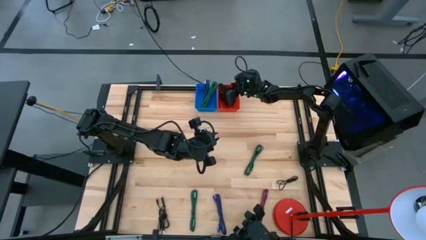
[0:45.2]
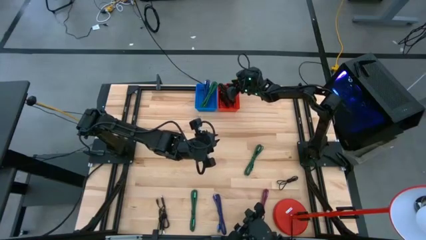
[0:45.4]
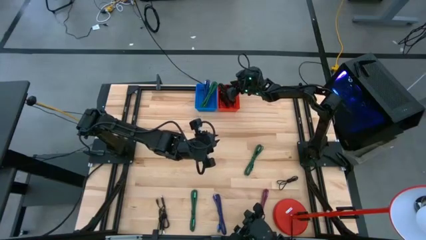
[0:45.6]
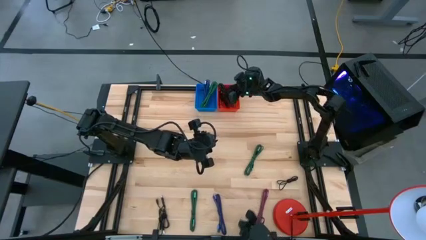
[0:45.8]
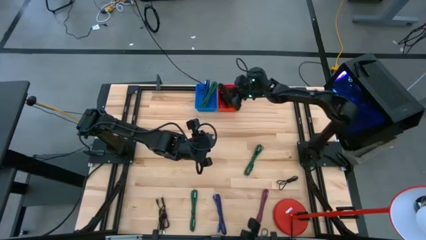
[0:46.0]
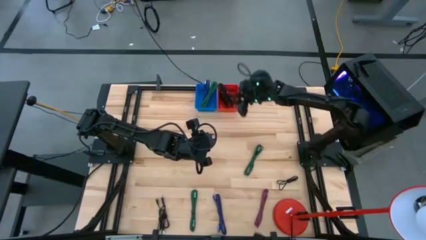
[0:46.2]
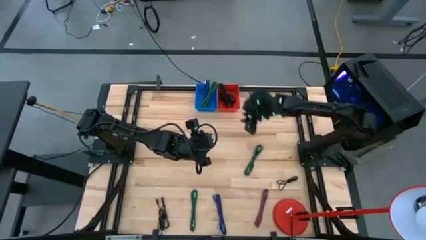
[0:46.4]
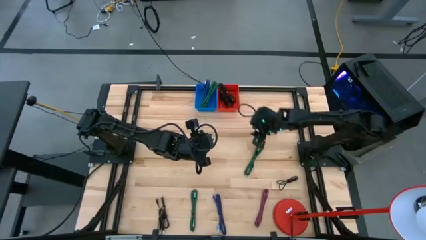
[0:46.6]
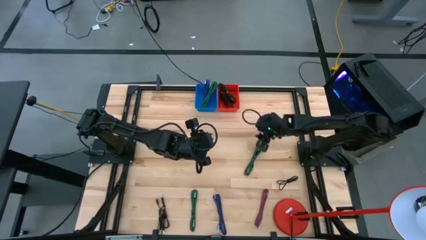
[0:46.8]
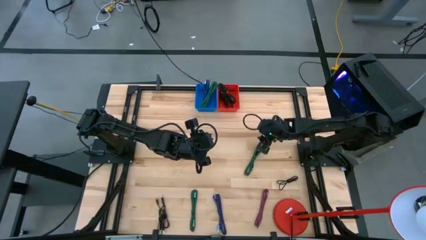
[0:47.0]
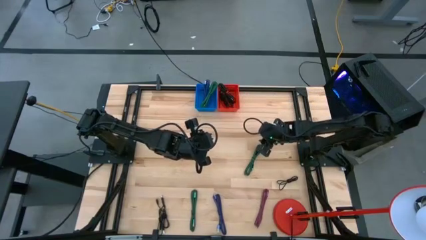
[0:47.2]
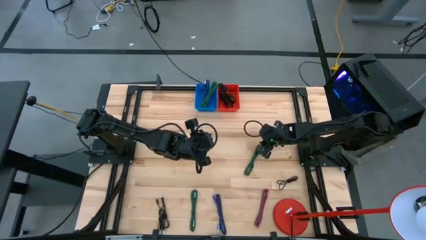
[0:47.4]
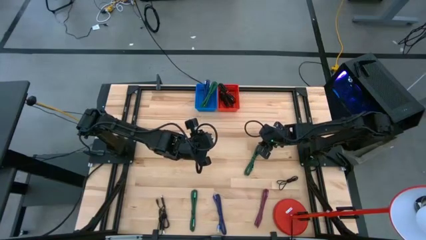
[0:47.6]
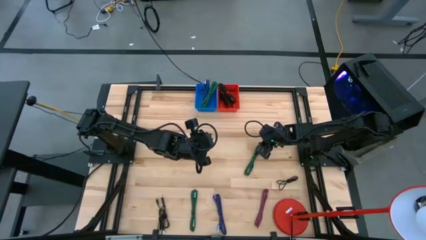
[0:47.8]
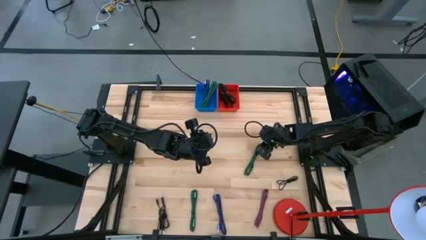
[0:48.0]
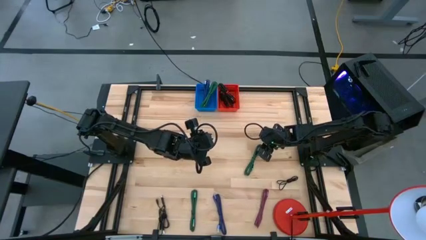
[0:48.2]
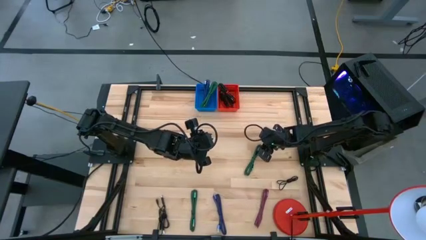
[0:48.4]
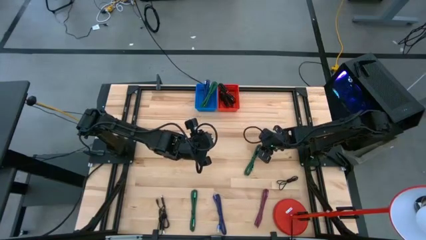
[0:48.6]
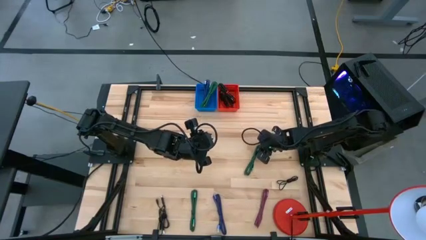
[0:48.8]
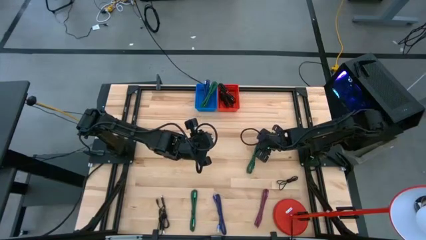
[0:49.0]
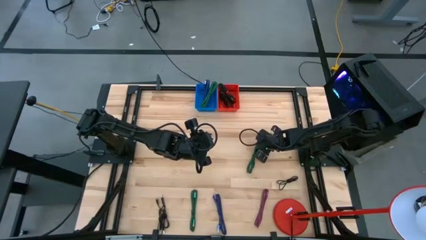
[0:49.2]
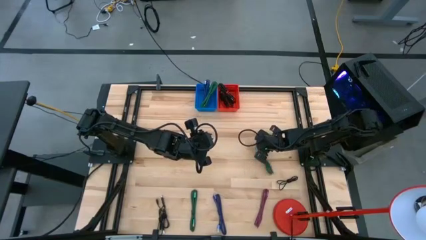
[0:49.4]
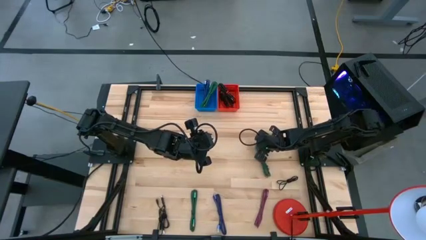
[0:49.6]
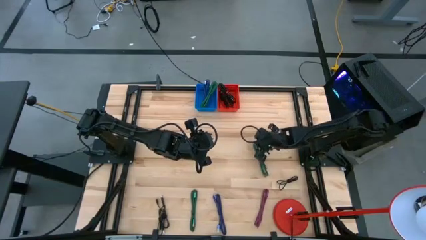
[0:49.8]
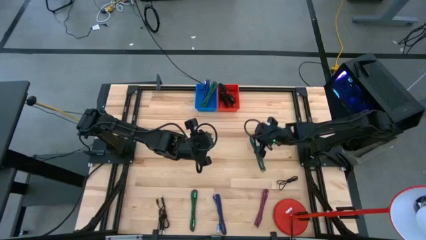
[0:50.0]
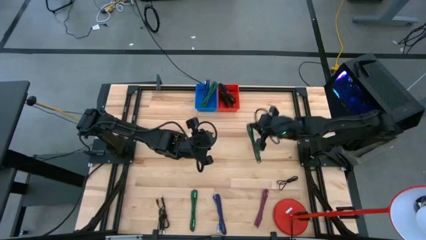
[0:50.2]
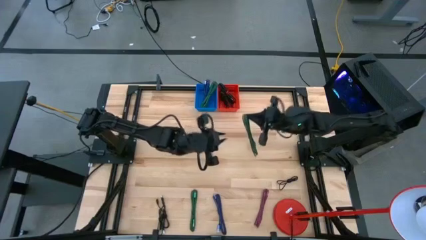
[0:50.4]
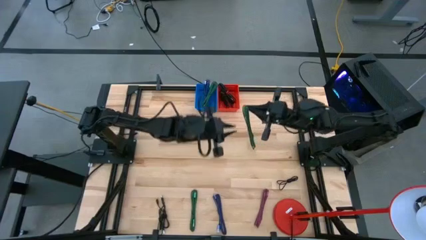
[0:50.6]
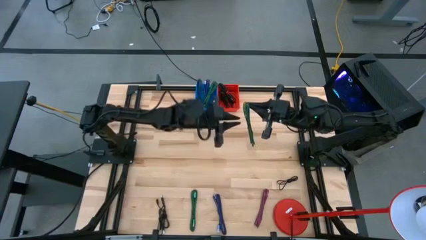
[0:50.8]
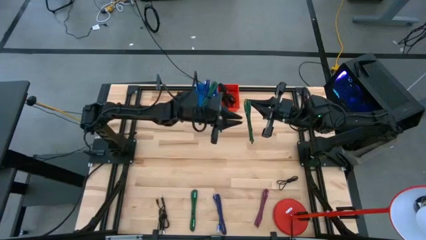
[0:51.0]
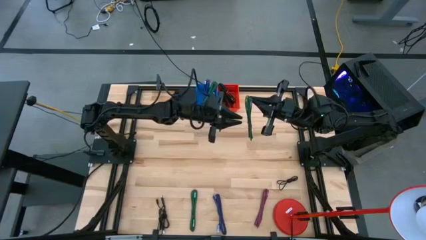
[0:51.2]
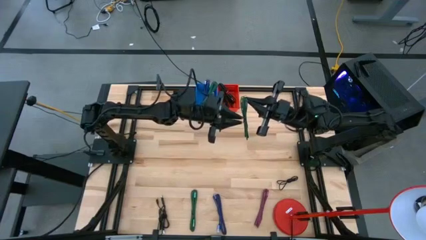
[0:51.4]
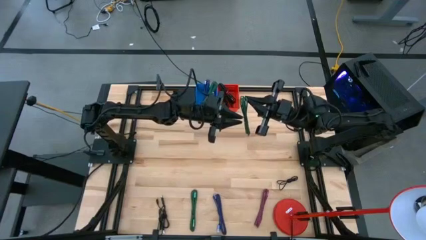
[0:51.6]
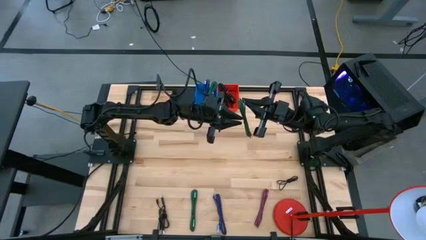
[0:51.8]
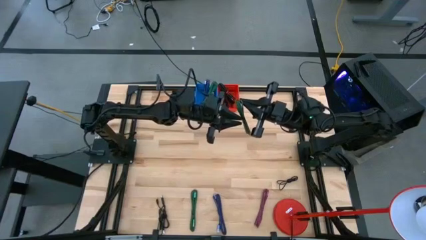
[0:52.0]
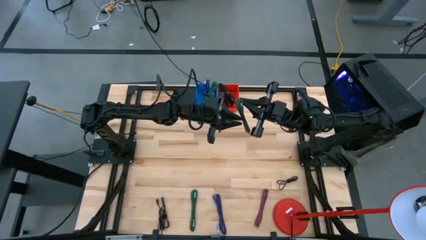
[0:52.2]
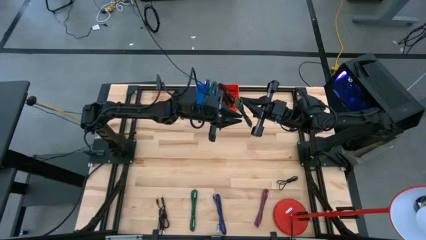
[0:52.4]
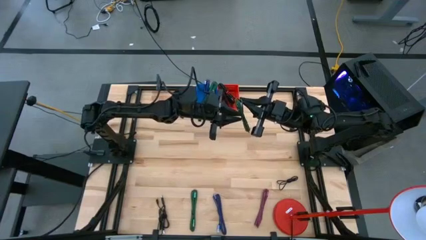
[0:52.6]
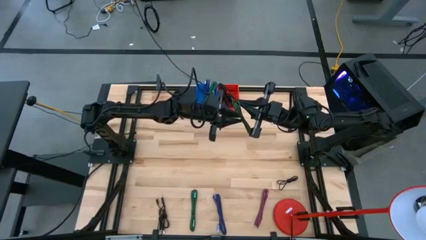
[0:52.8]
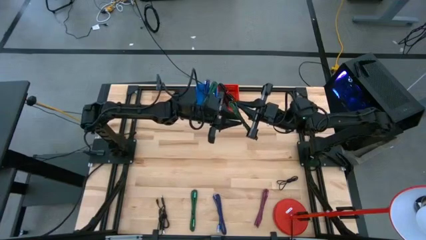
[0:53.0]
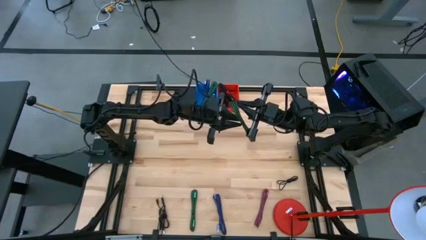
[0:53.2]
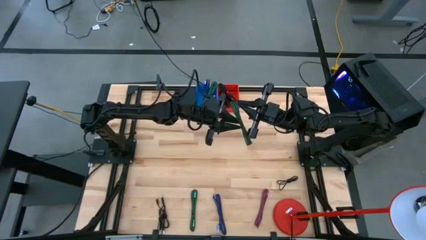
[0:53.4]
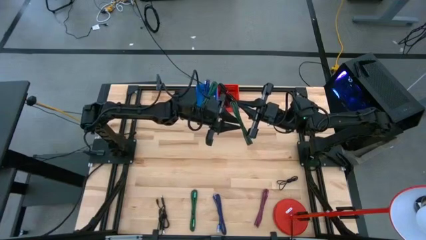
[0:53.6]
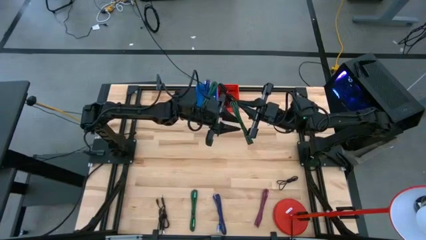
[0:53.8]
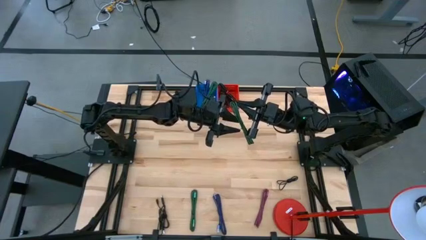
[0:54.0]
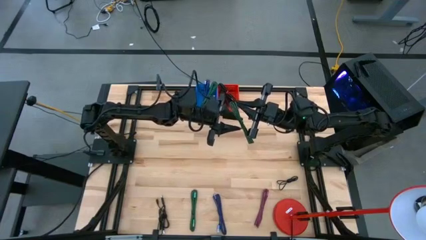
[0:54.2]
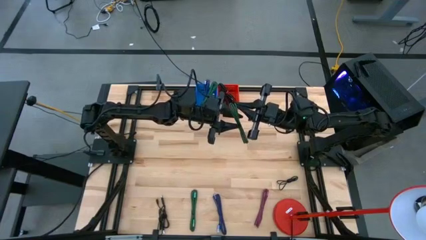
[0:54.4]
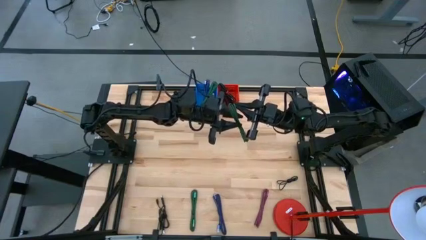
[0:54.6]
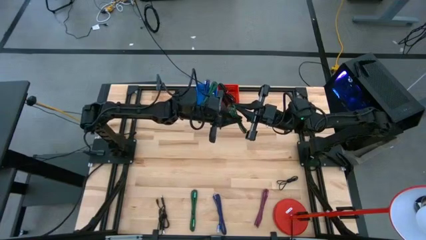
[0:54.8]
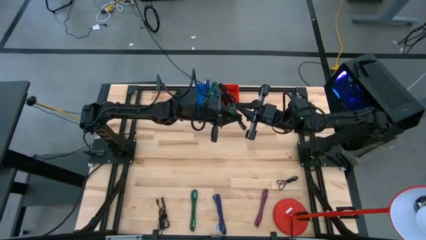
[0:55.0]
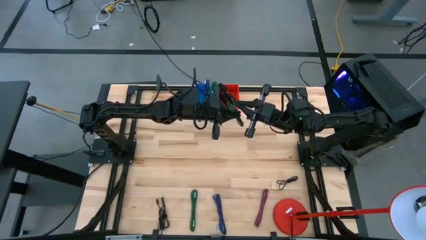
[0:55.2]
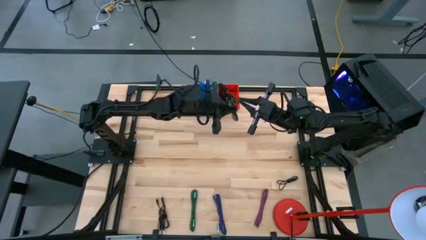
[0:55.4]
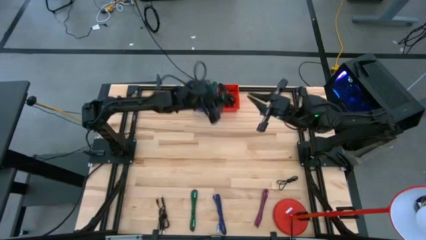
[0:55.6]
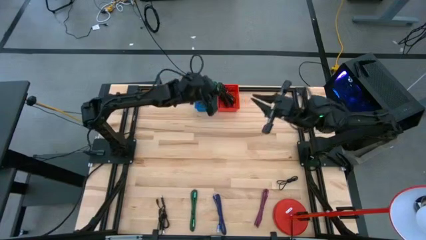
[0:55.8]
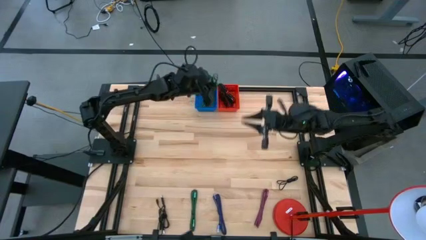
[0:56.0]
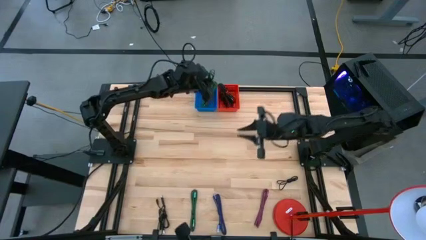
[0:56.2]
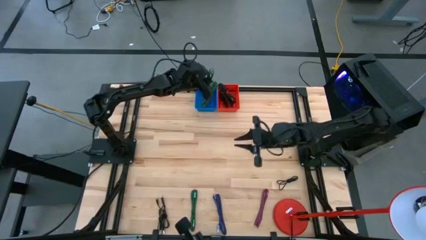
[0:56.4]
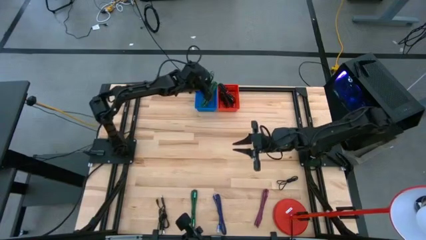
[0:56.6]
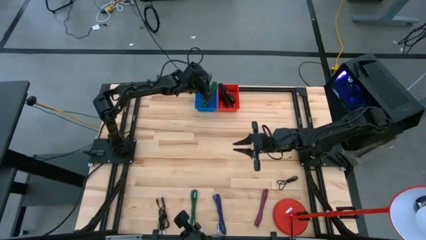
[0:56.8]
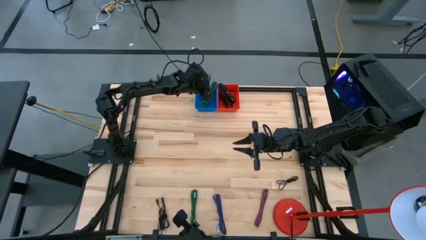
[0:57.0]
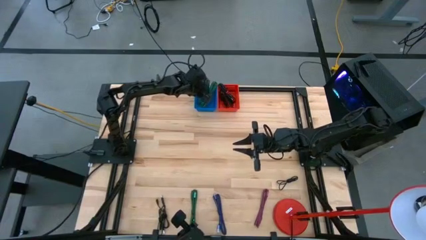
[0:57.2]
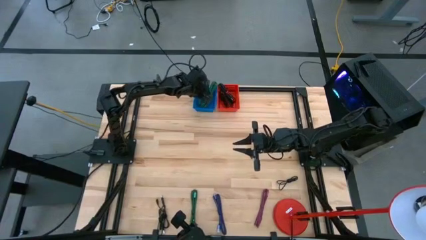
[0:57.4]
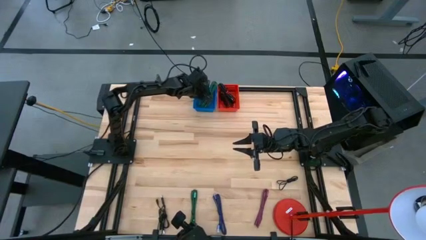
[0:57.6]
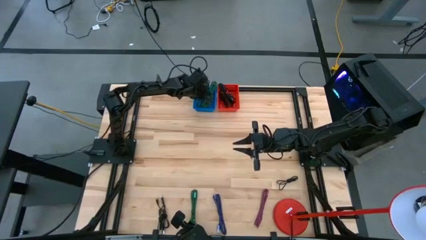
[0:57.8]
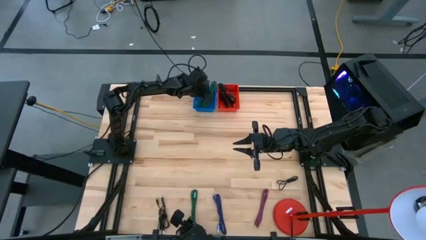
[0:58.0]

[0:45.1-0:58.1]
Task: Pick & Place USB Port
Put the green charger cable into the blue bin
